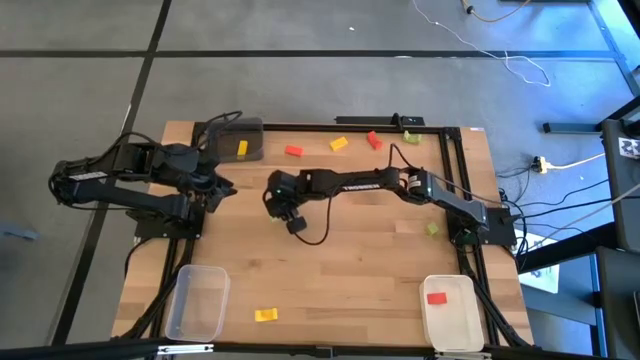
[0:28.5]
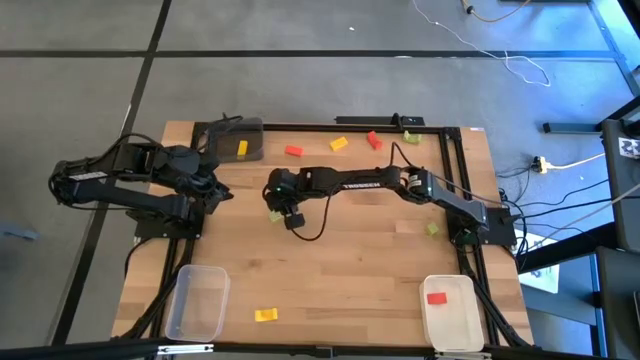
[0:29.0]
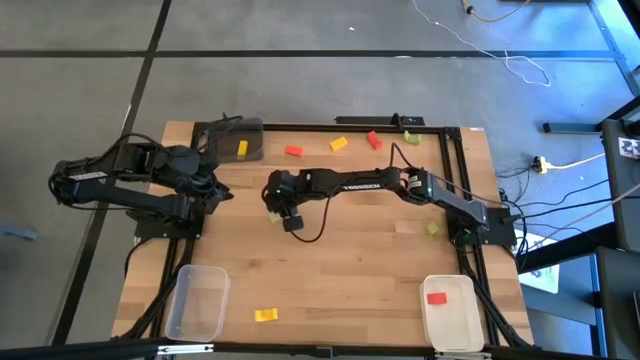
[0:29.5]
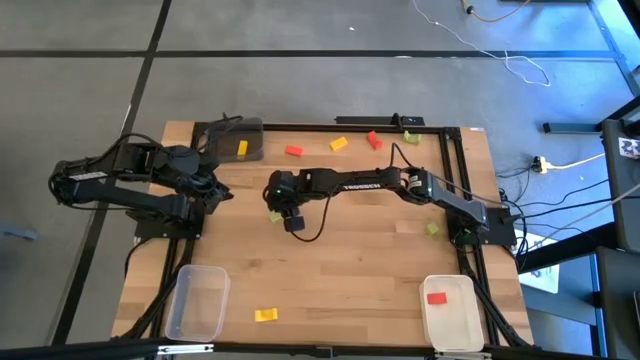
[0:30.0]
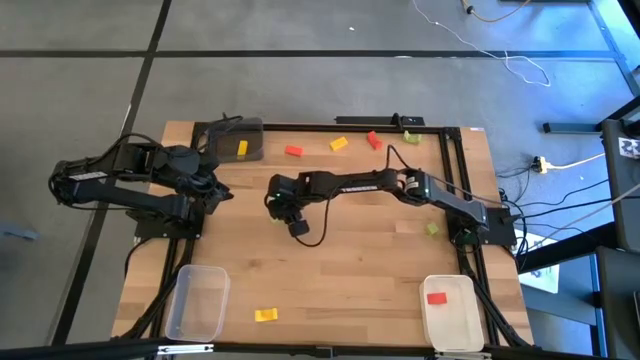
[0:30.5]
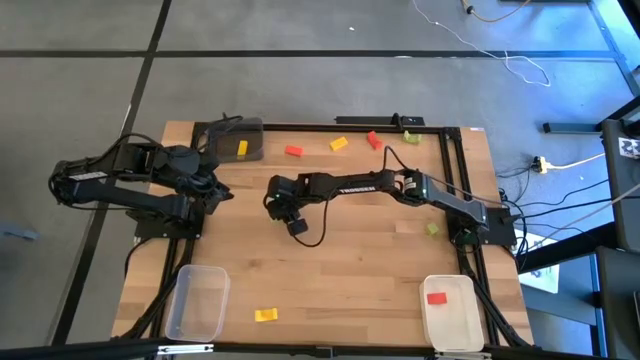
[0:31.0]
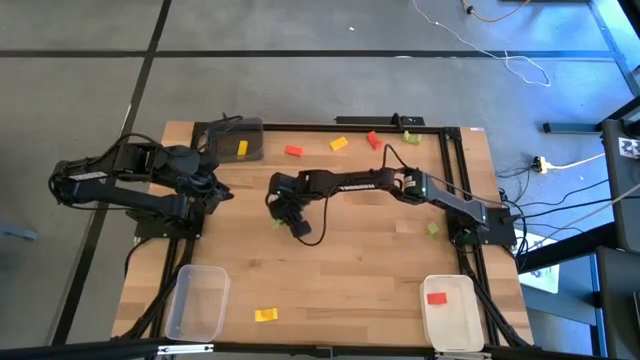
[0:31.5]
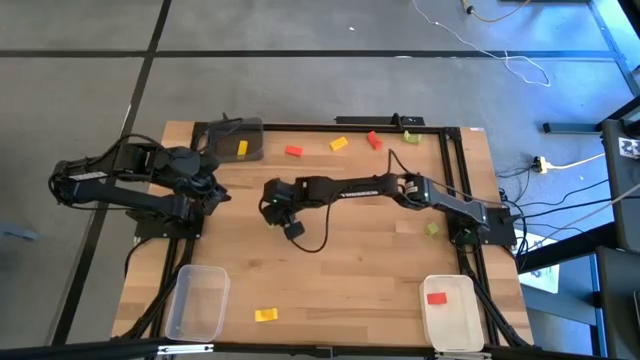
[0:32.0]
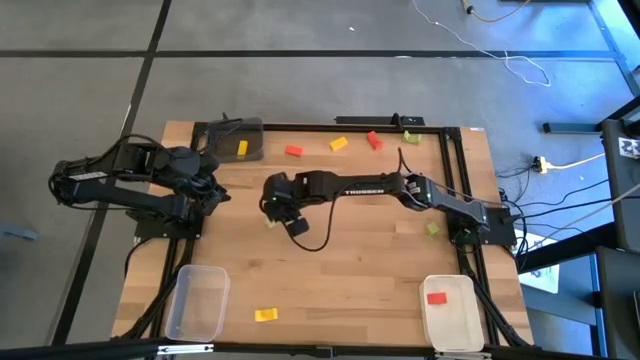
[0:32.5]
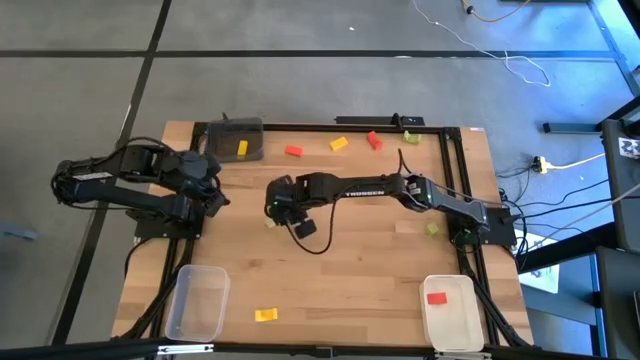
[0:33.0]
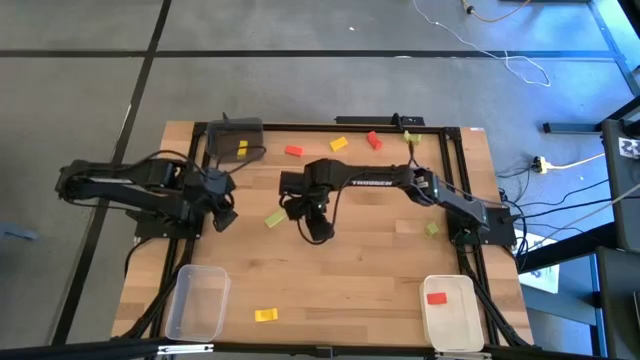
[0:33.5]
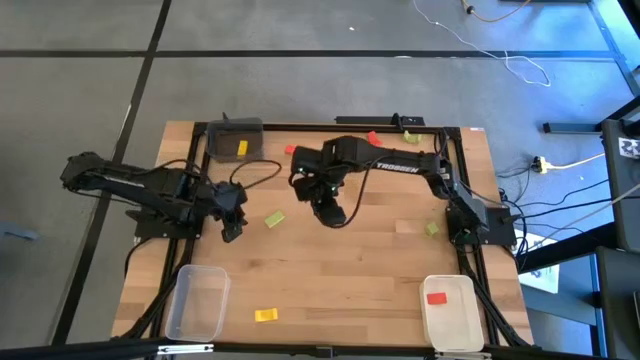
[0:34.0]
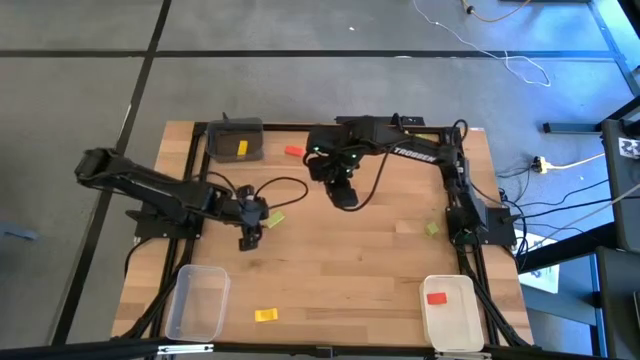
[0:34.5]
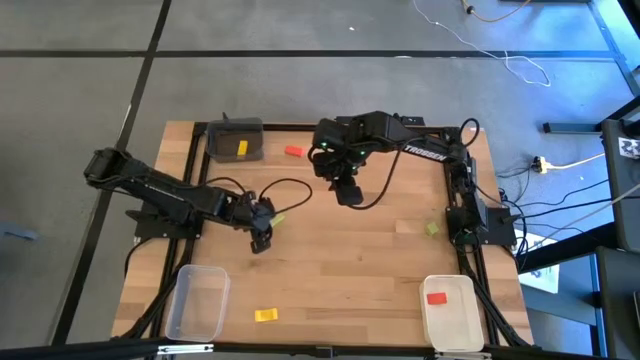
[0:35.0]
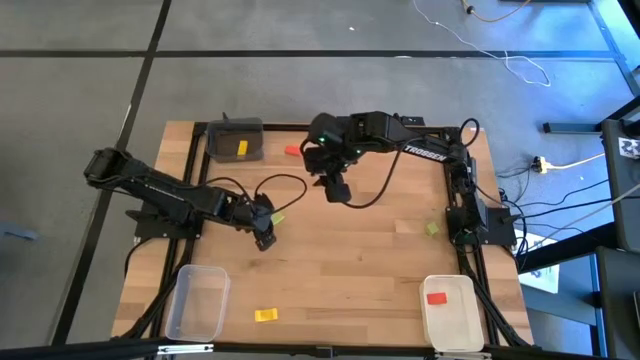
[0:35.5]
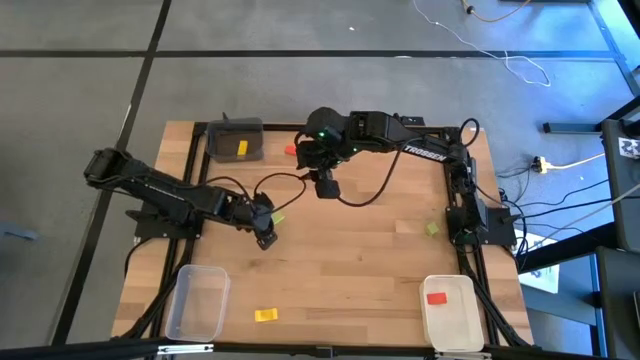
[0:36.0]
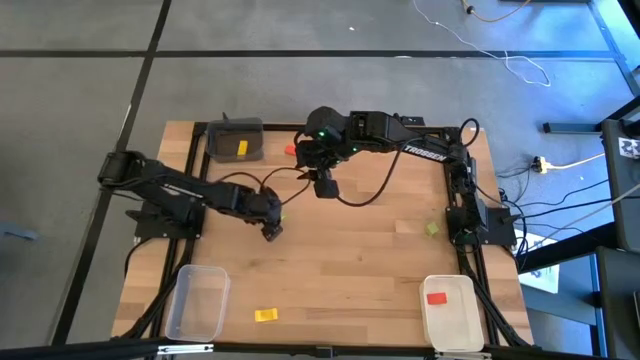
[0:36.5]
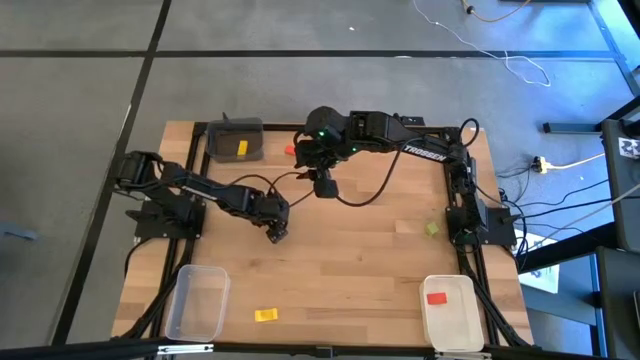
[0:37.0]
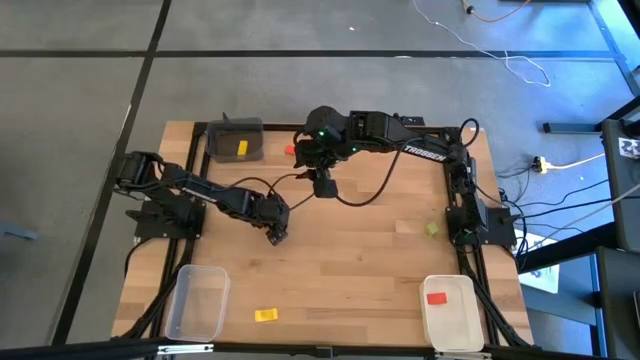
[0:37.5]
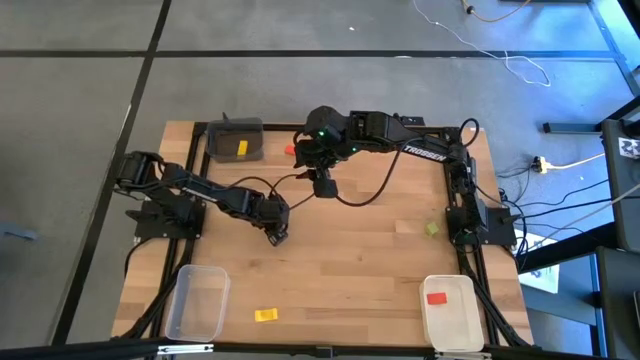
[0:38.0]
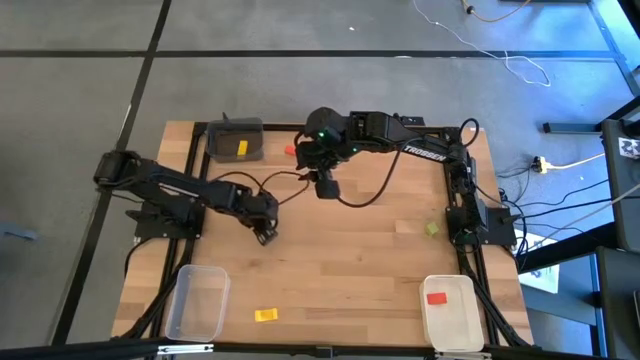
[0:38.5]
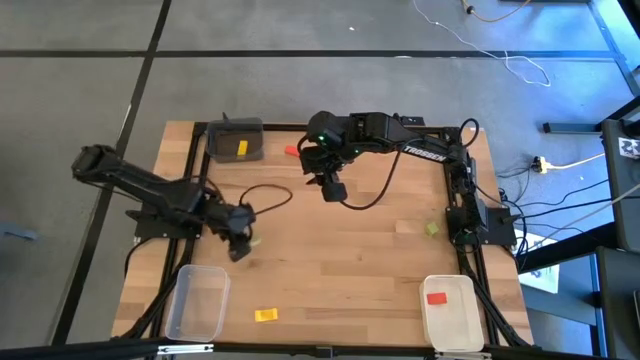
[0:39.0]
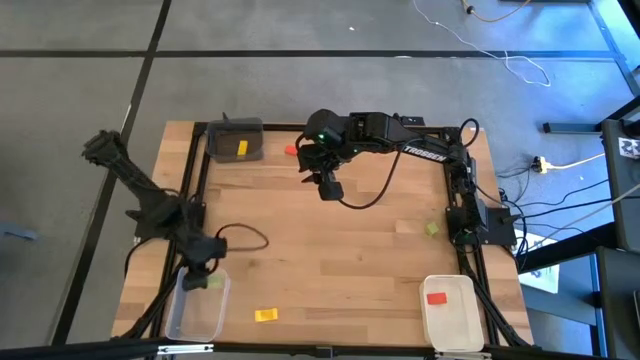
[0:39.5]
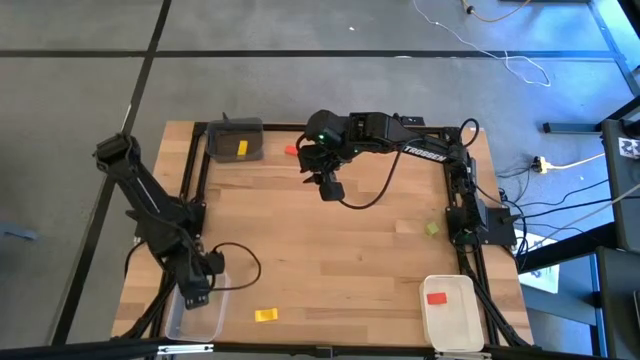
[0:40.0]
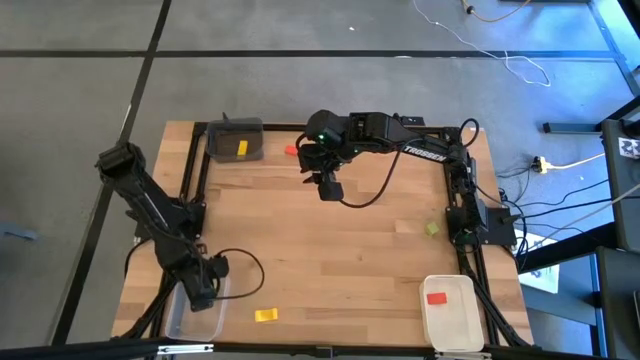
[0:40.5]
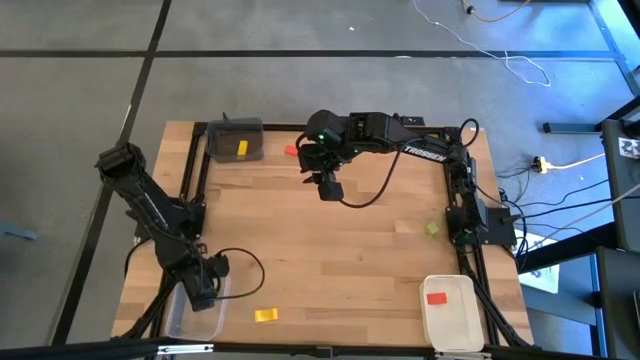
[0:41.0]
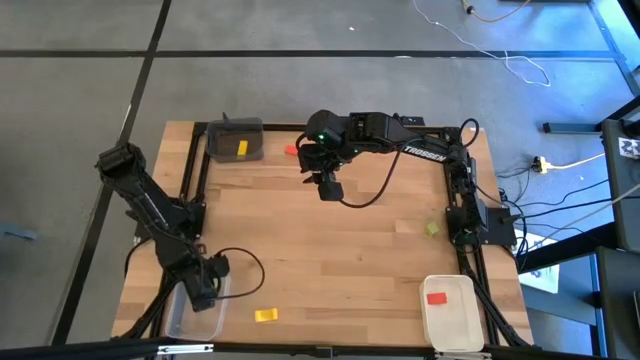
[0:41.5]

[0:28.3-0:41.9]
Task: Sort & place blocks by color
Put the bottom left green block into the transparent bin

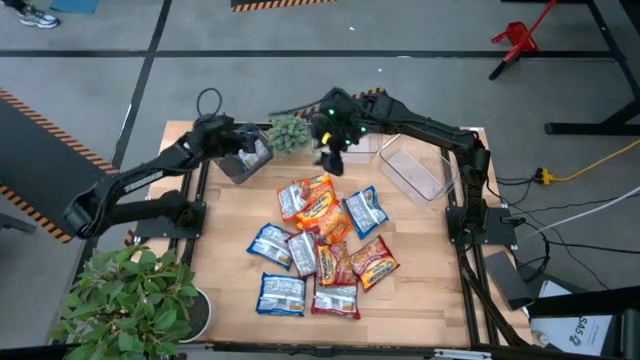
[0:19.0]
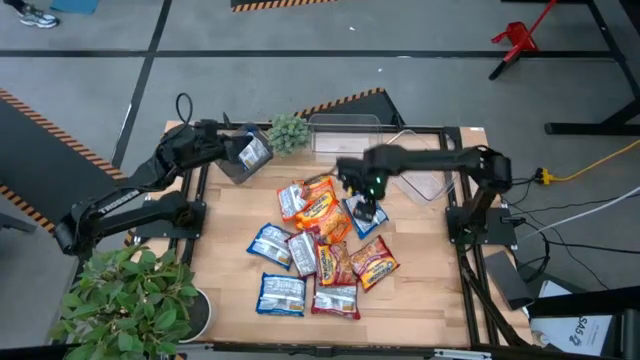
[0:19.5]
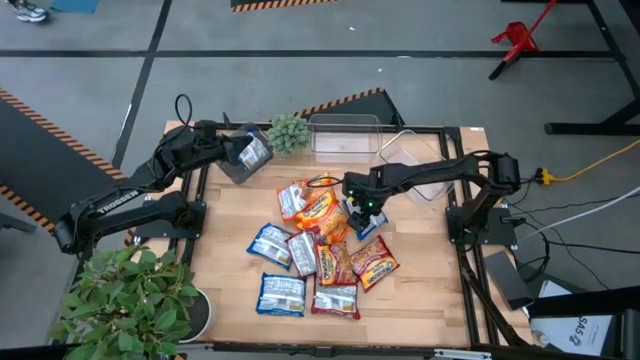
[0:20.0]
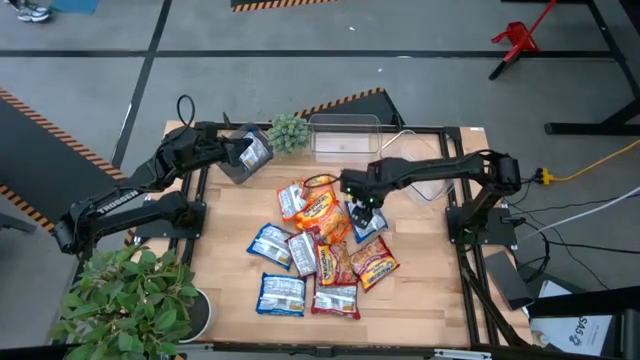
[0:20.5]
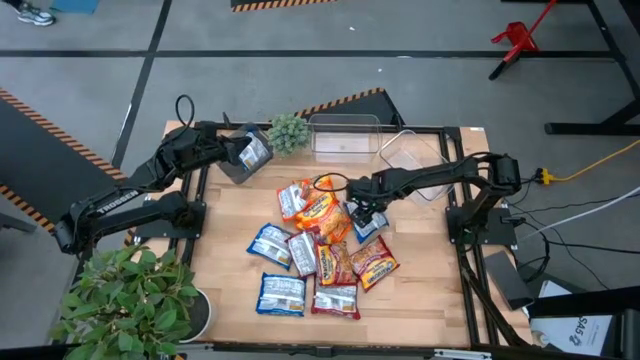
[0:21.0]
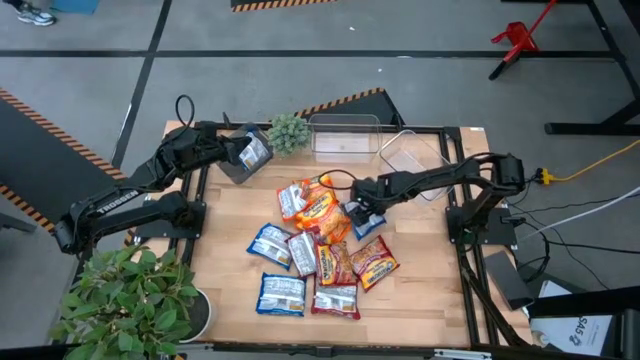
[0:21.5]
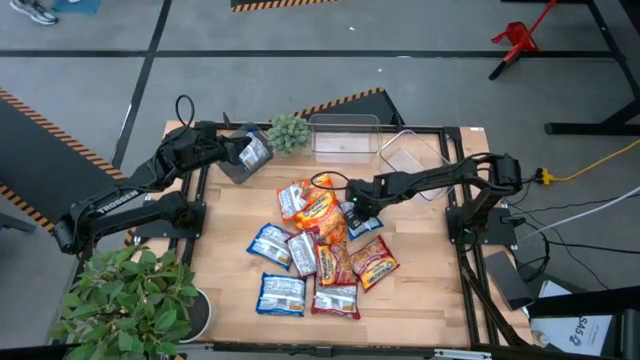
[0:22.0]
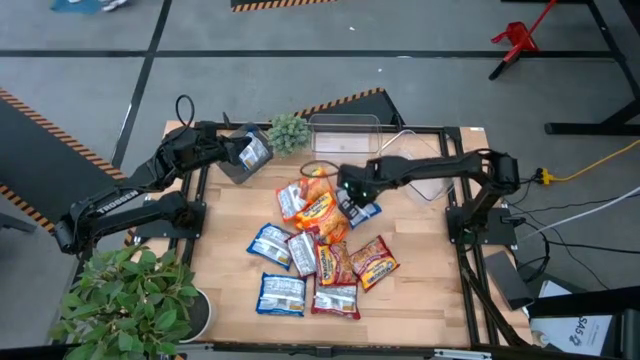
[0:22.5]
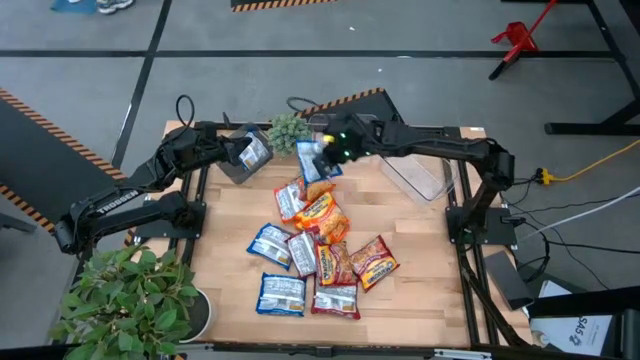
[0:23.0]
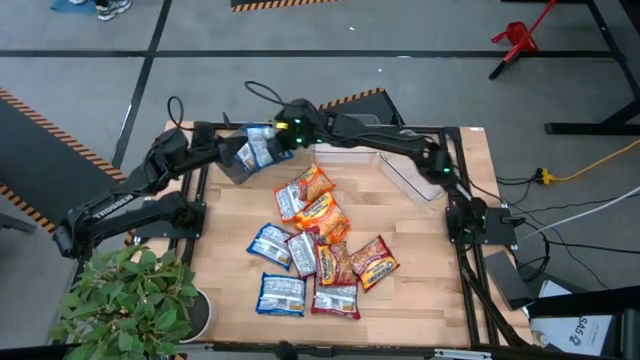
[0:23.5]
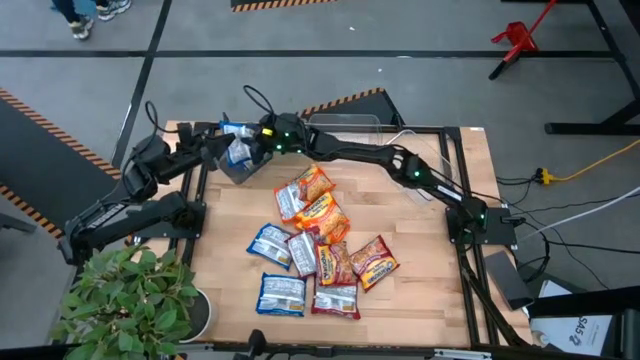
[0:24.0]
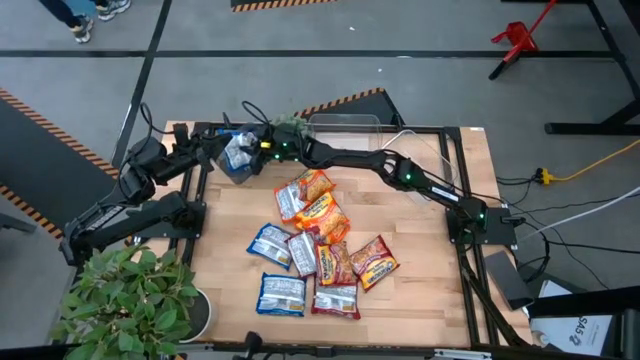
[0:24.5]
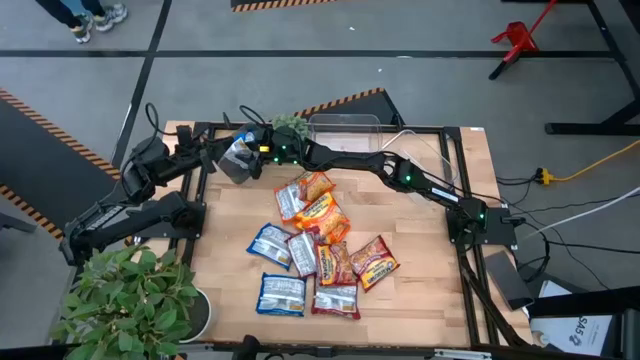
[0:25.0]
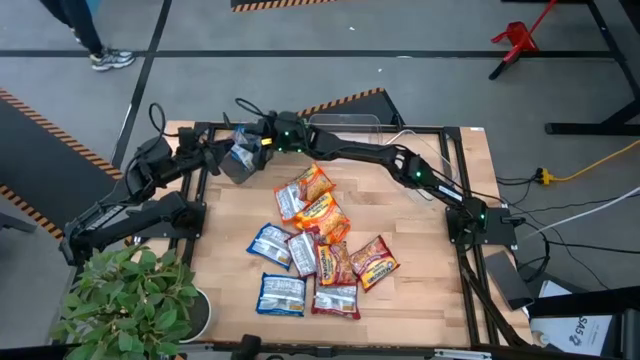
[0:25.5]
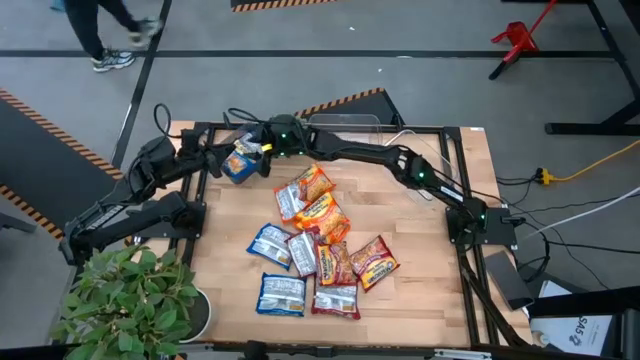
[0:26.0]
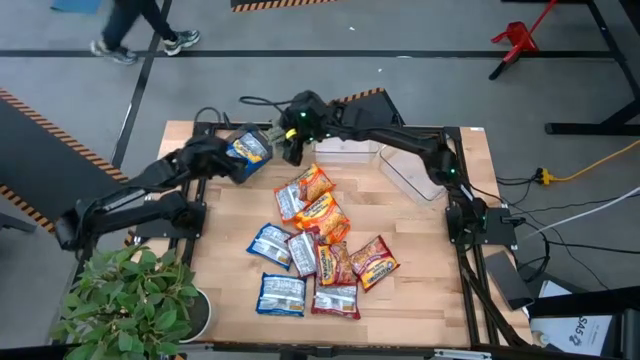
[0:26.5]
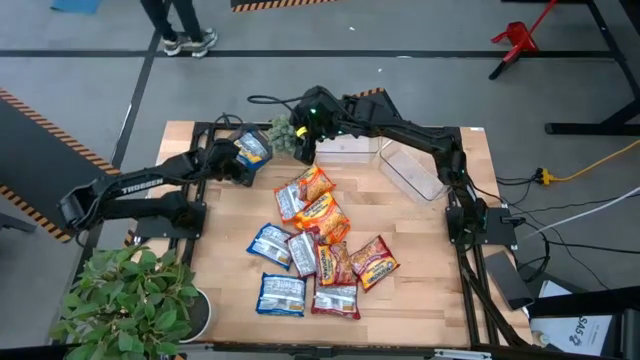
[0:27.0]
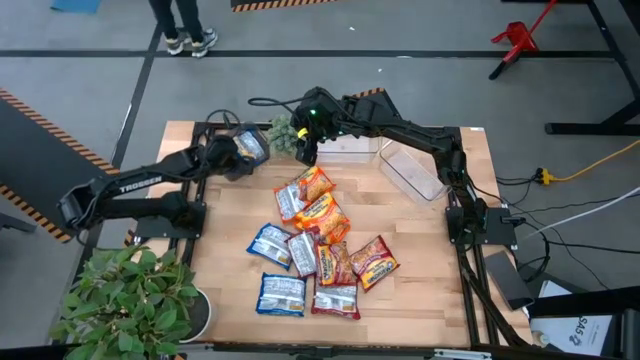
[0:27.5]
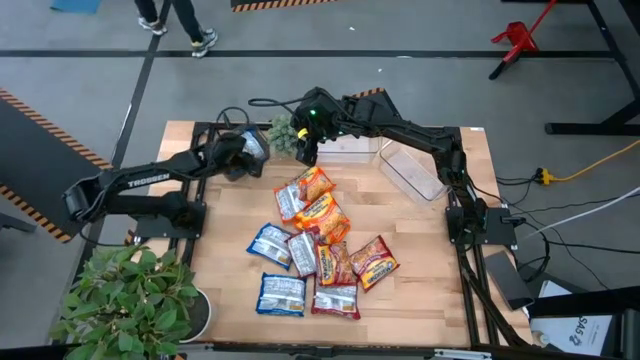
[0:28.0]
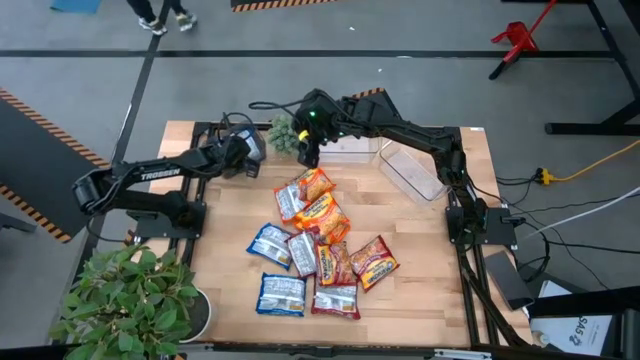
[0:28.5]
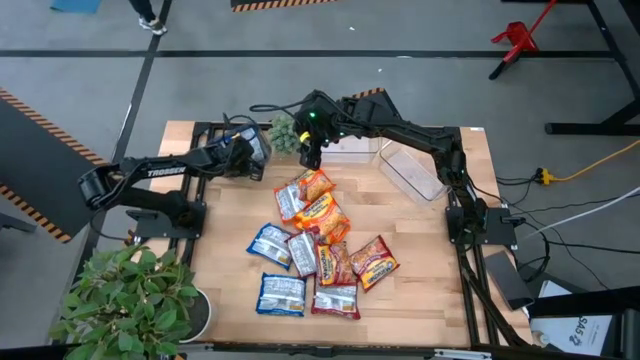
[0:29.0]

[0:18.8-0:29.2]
Task: Sort Maruchan noodles
Put the blue noodle pack into the black bin
